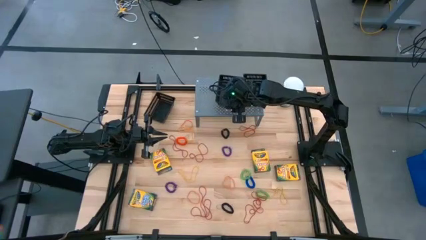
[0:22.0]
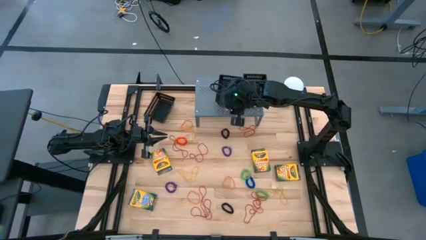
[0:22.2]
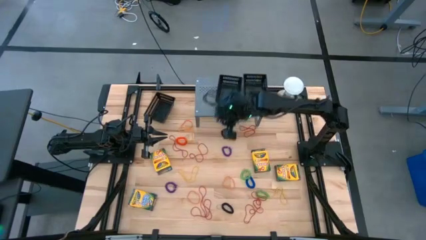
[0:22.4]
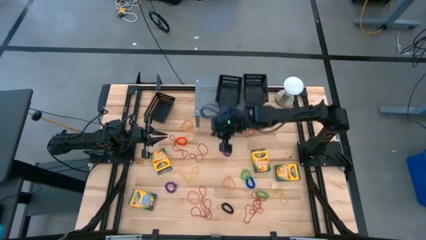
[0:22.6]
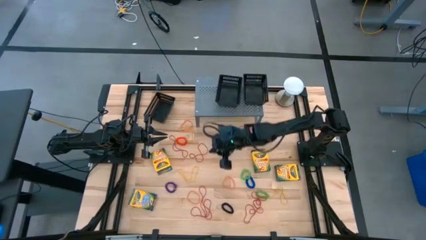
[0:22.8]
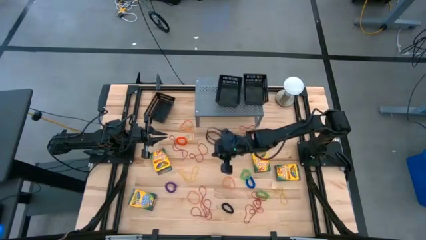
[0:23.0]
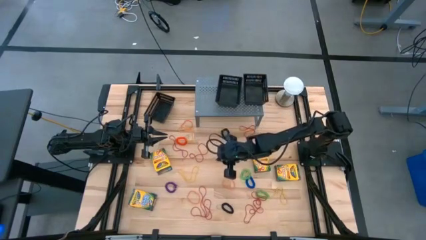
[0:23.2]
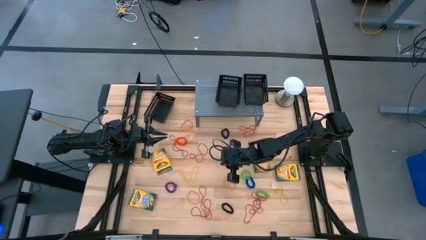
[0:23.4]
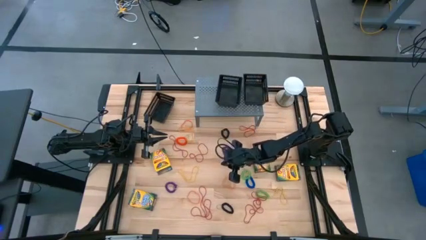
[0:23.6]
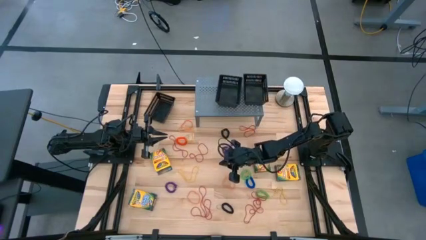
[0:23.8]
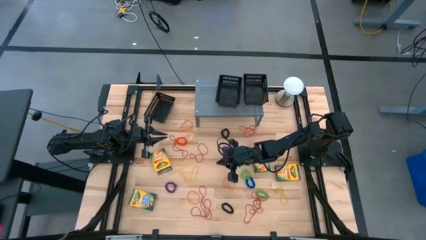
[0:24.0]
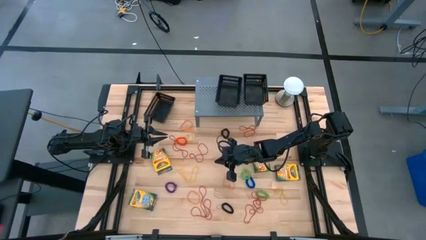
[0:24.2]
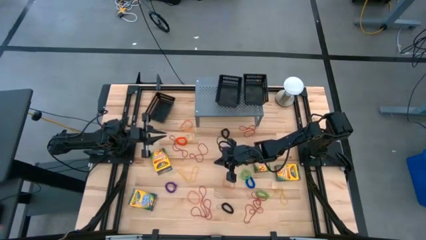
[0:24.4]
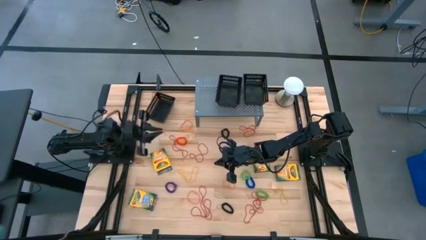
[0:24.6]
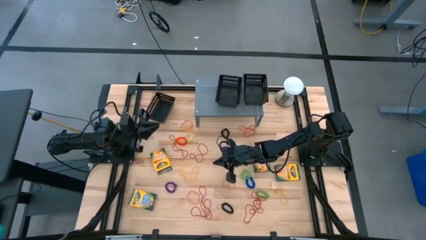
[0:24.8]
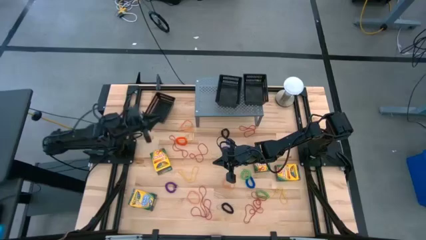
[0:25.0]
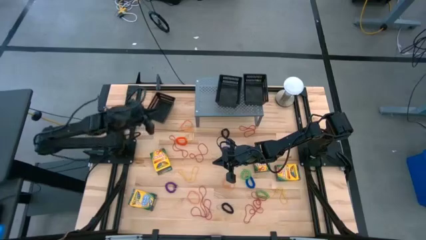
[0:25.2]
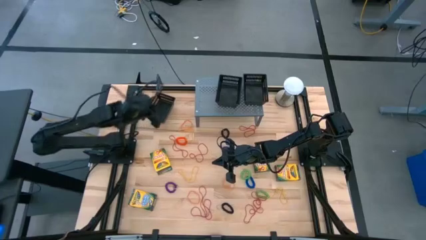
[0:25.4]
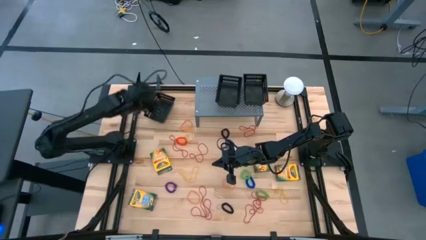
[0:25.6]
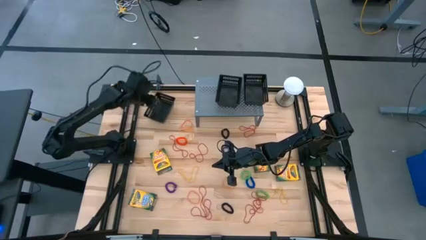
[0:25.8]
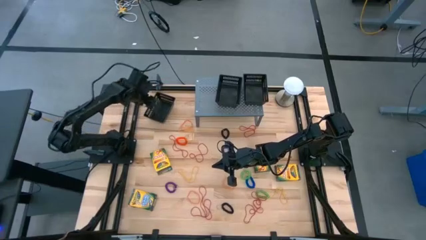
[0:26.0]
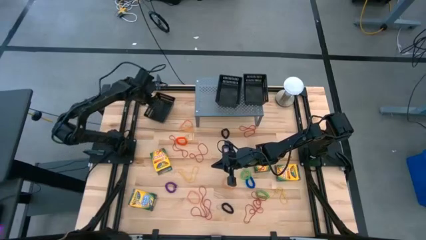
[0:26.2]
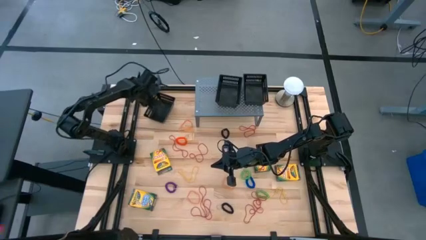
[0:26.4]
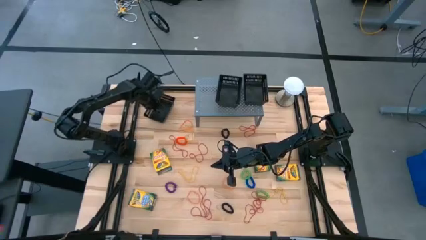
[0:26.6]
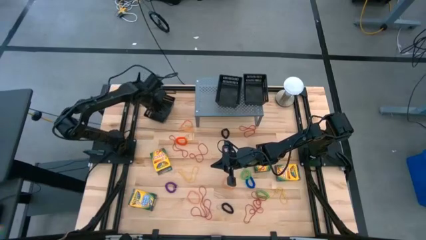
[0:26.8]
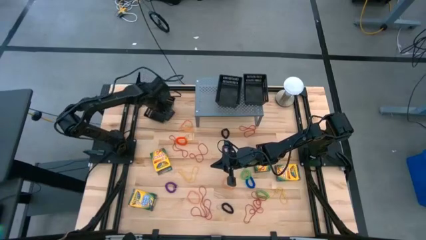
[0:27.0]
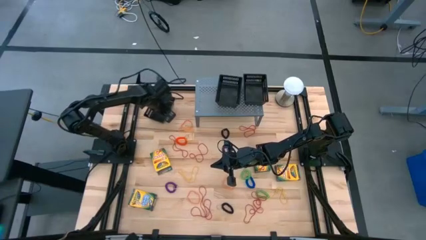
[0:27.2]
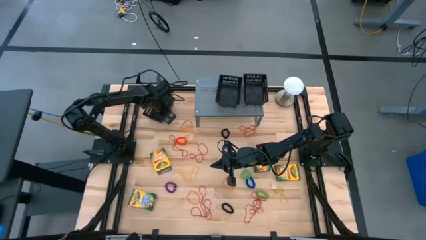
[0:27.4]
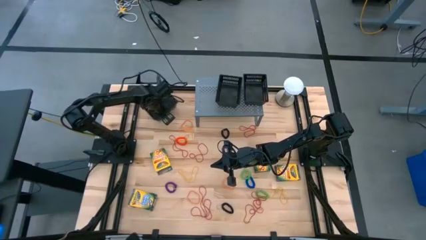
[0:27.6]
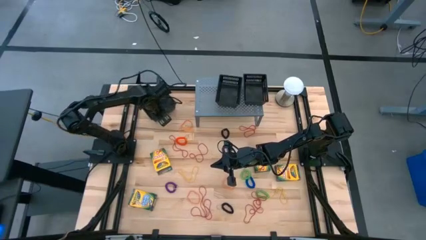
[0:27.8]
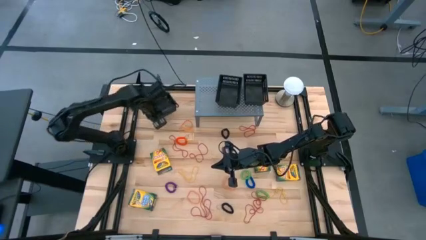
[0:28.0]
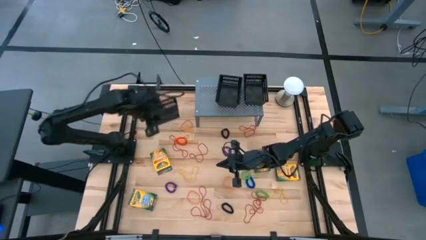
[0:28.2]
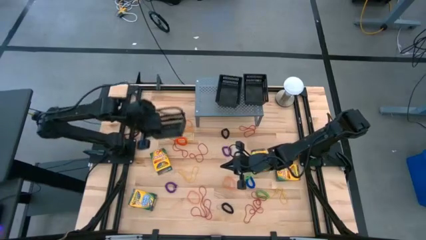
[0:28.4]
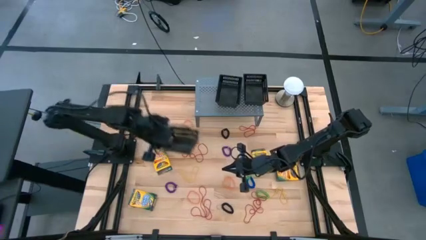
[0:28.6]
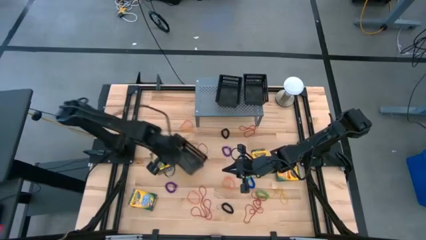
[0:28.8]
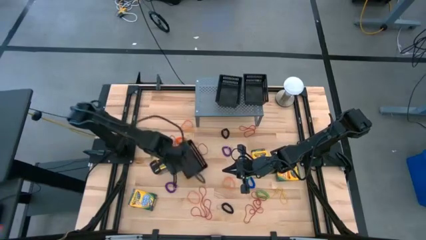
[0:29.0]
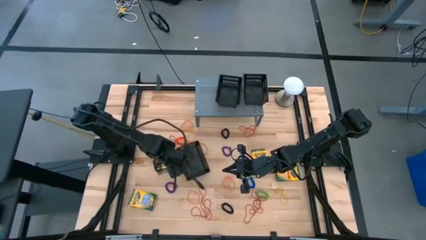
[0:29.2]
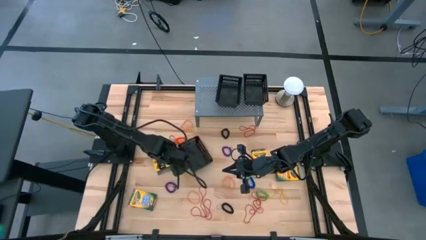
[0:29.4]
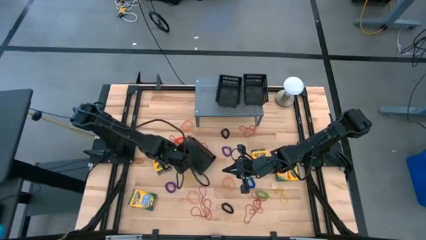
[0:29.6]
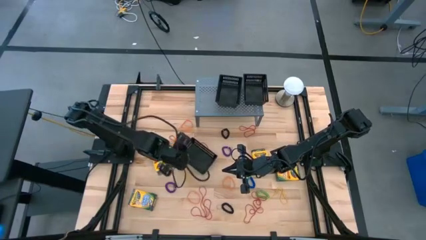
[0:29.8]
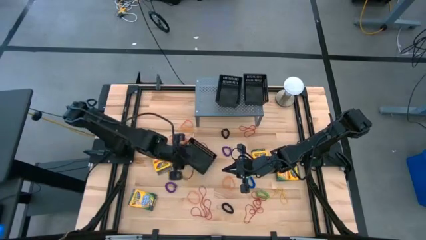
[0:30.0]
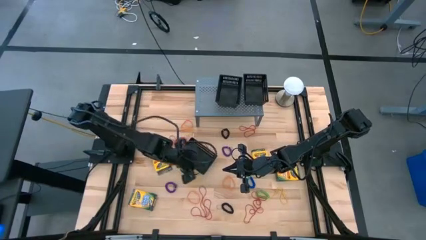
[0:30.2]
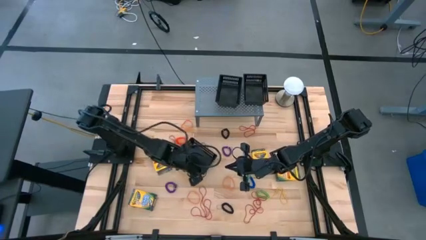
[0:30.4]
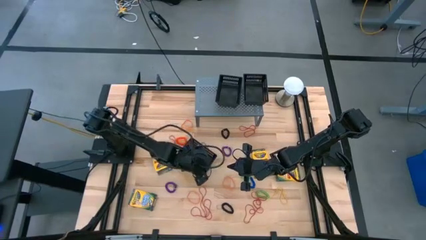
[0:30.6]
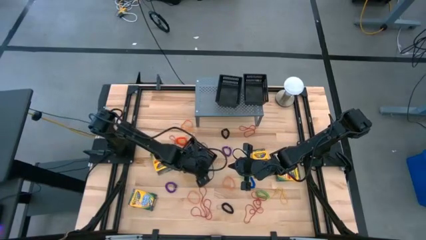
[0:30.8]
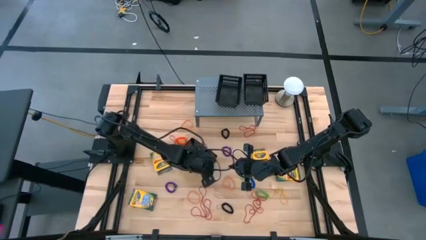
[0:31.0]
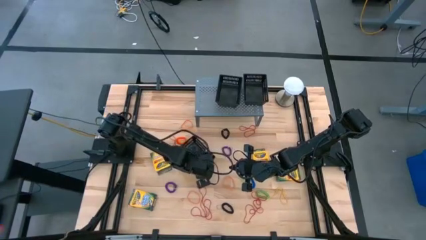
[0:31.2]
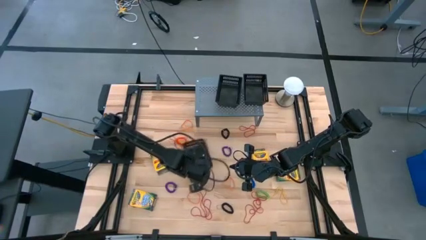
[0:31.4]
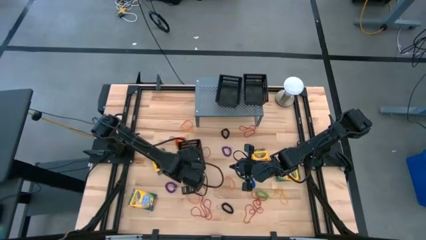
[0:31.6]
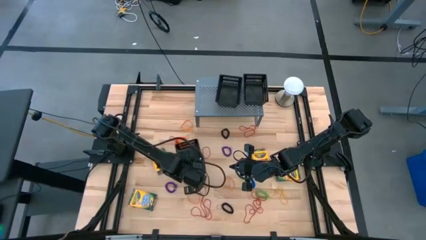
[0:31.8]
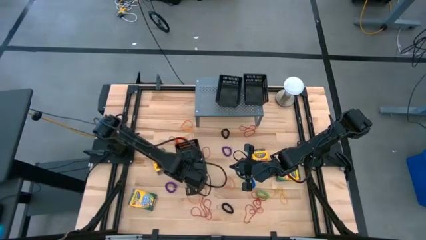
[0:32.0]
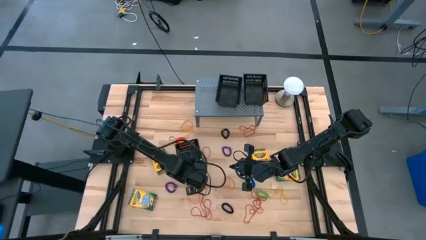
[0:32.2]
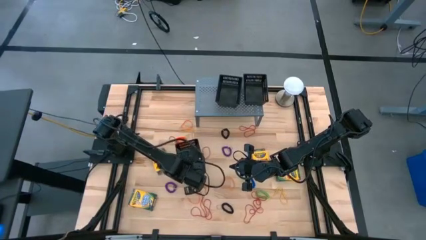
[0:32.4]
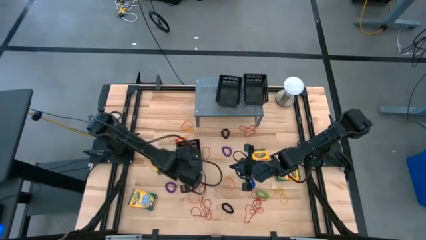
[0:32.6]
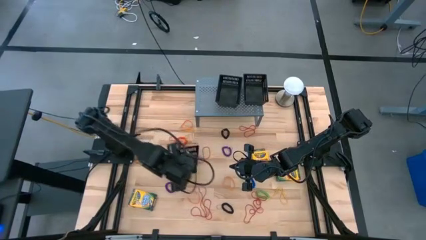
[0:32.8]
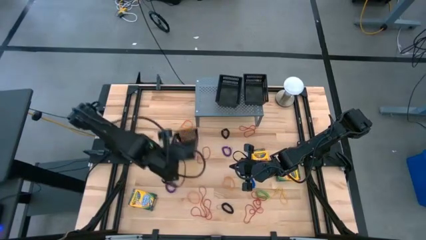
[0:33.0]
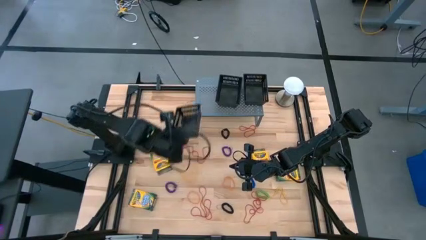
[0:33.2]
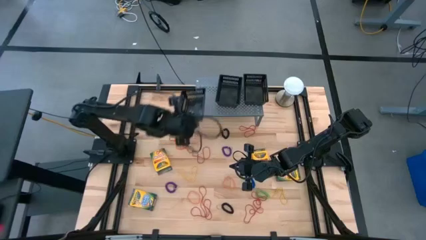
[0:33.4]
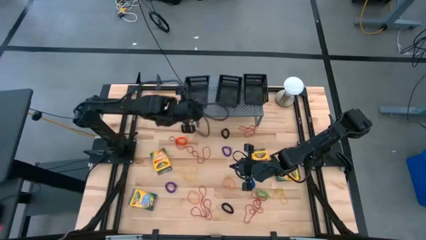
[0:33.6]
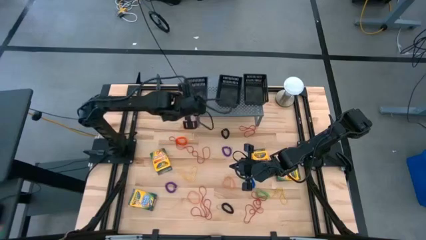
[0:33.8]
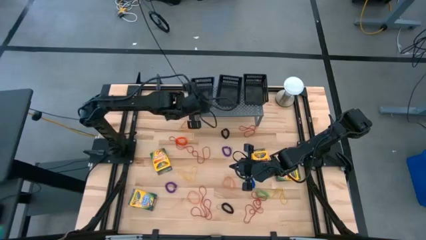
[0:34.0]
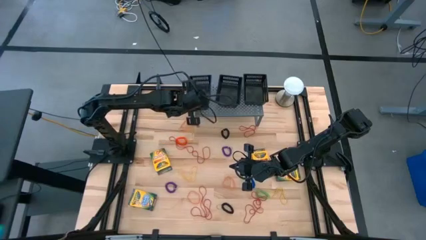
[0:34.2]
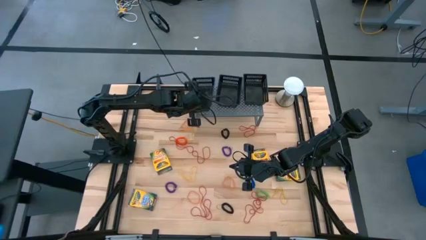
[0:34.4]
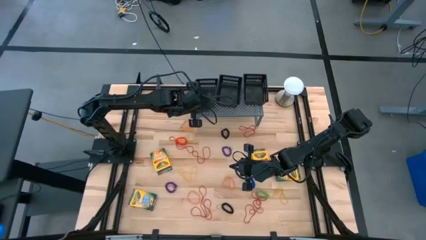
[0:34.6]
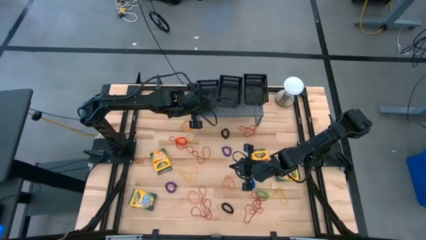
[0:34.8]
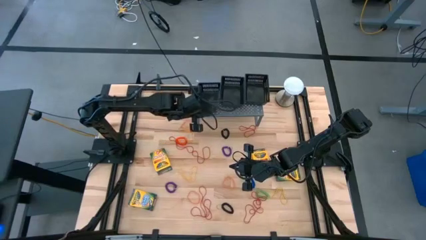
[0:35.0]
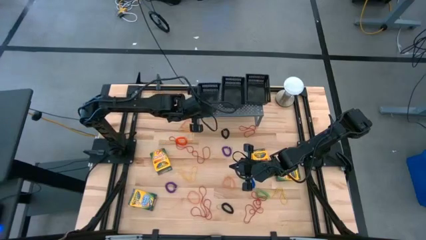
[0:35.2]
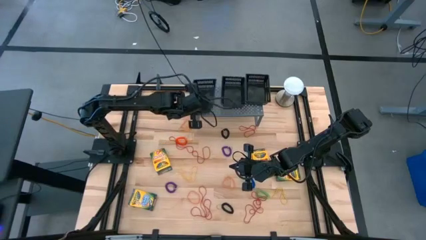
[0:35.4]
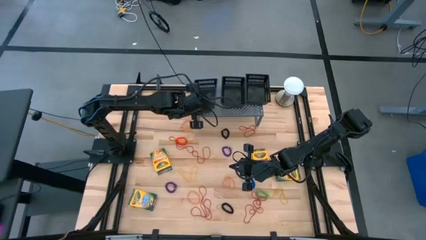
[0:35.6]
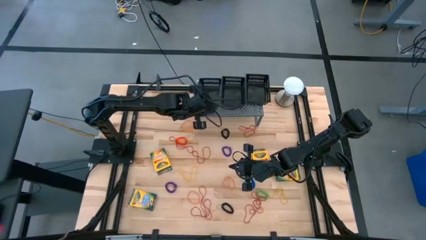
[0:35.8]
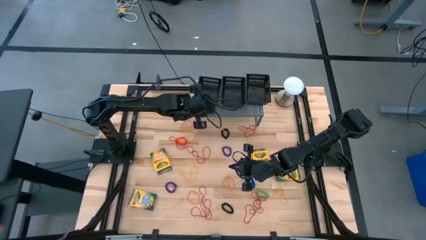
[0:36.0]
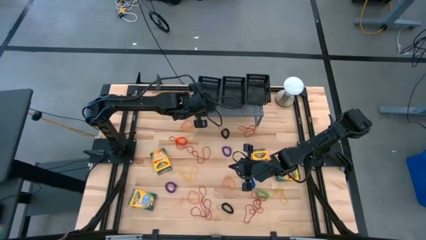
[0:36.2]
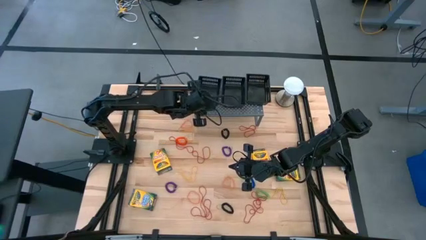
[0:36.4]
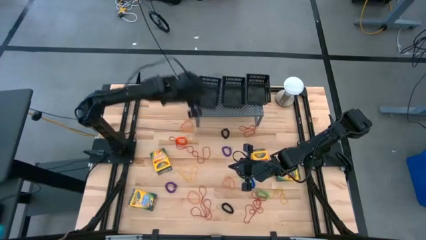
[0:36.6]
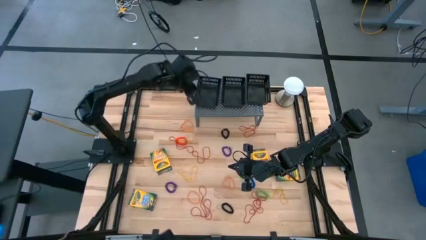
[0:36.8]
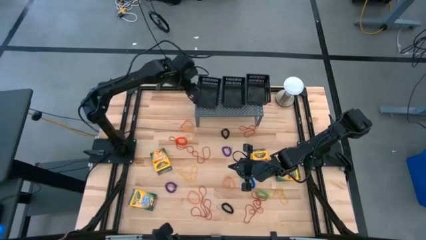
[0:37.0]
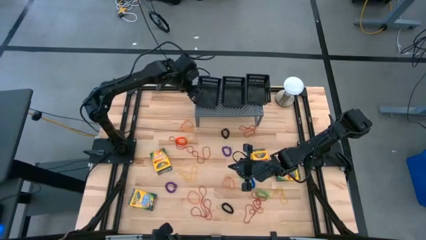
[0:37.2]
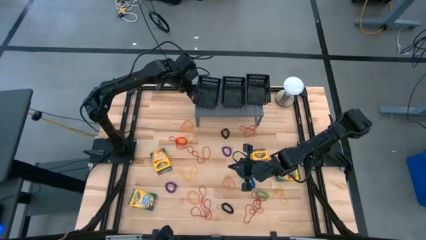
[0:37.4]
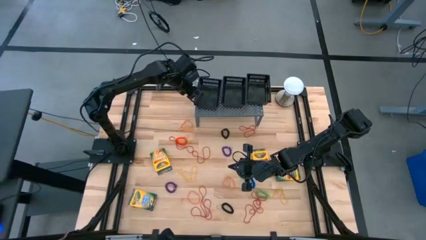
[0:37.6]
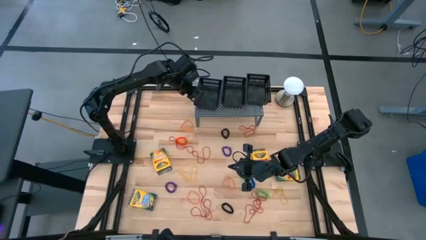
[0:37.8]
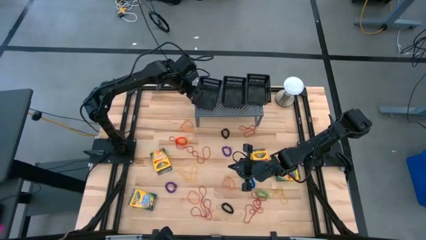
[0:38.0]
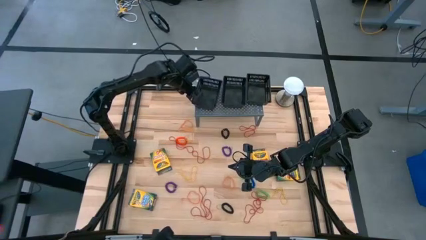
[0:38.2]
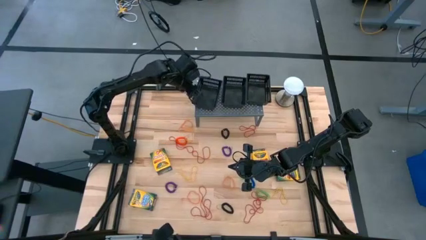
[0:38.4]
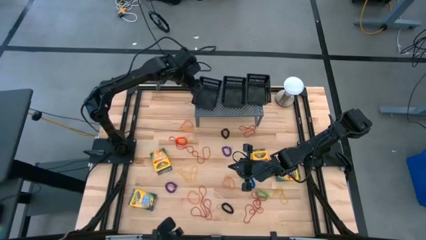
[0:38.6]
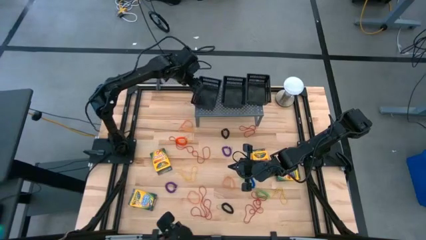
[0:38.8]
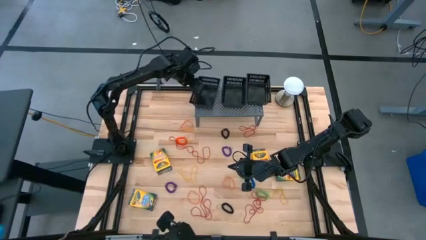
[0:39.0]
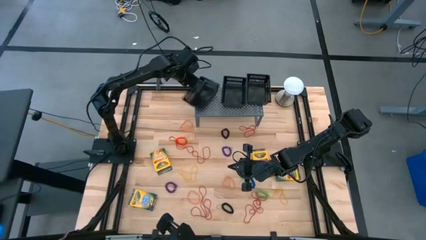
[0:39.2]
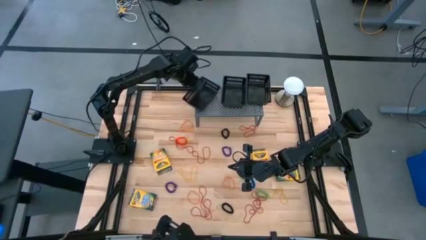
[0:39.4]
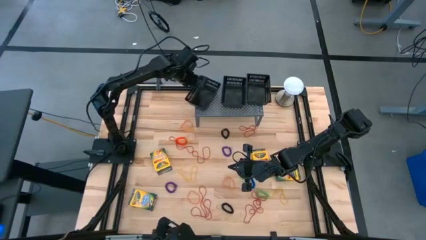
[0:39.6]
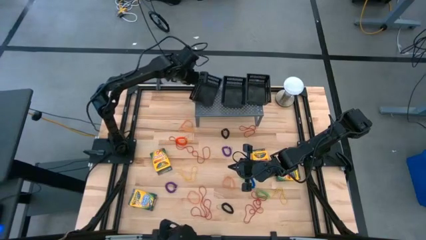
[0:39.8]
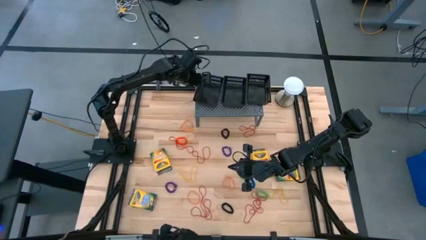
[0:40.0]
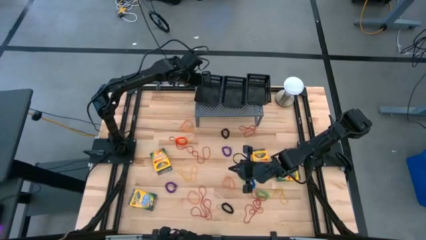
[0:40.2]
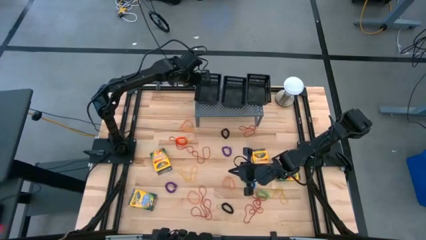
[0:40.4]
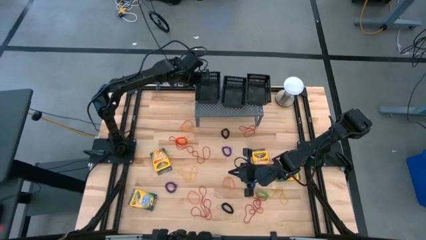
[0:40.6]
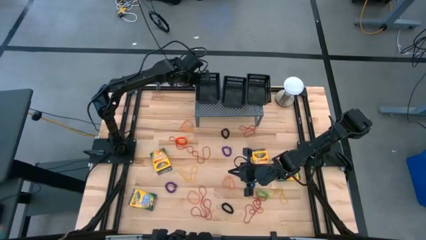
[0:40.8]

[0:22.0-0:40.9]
Task: Sort rubber bands into baskets
Put the top black basket into the shelf
